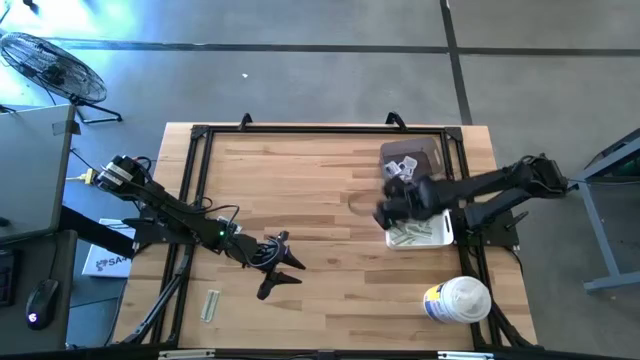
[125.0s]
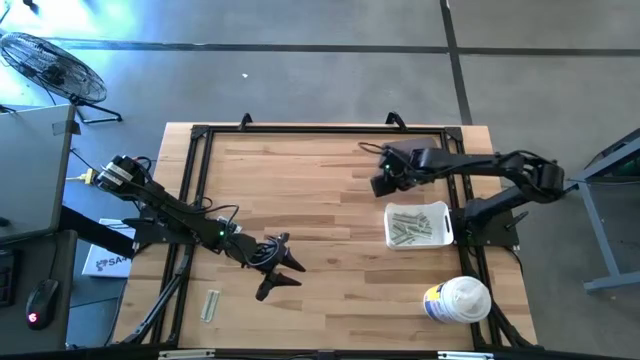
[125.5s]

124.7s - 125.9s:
Task: Pick & Place First Aid Supplies
Adjust the gray bin

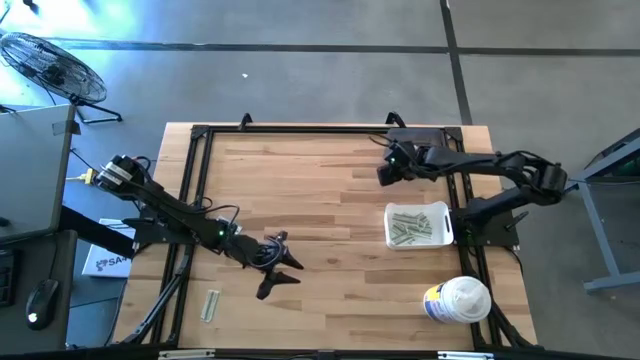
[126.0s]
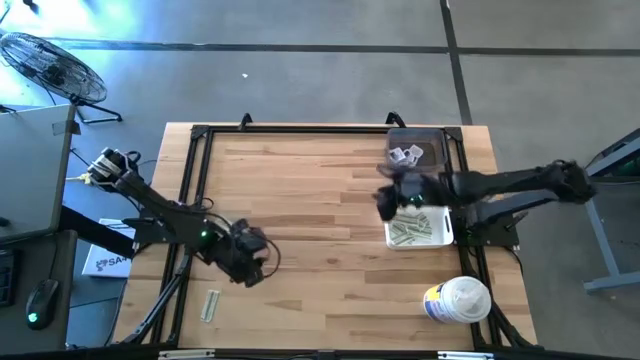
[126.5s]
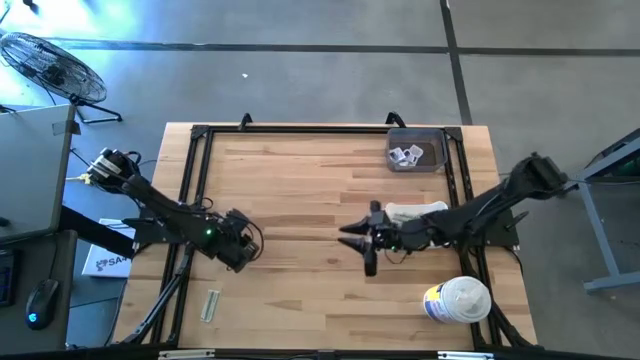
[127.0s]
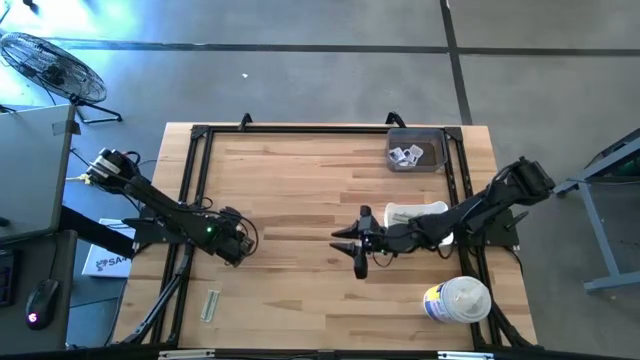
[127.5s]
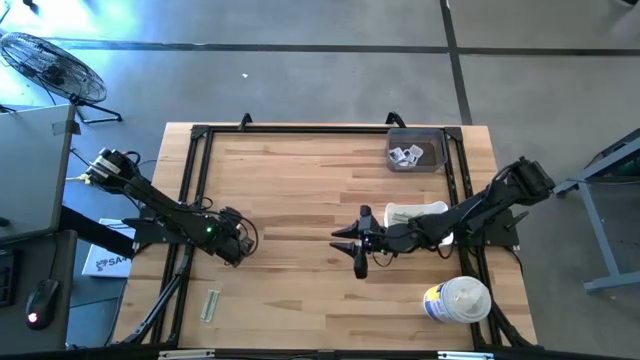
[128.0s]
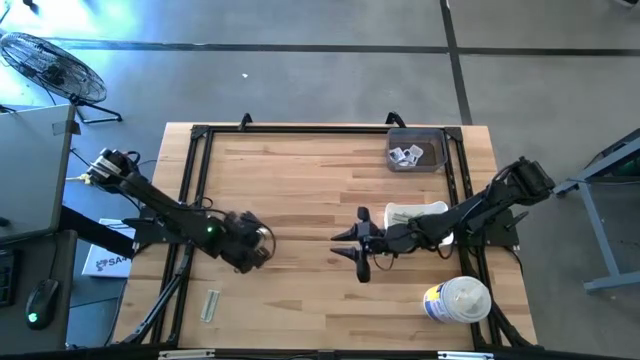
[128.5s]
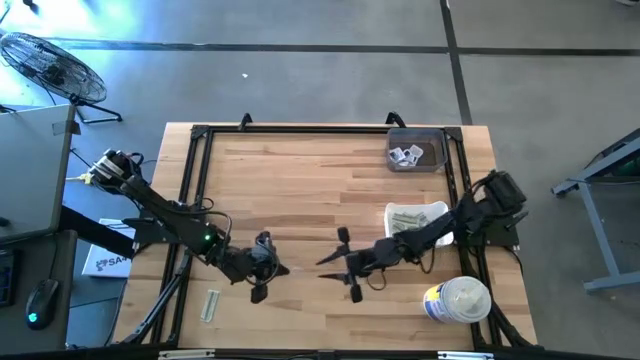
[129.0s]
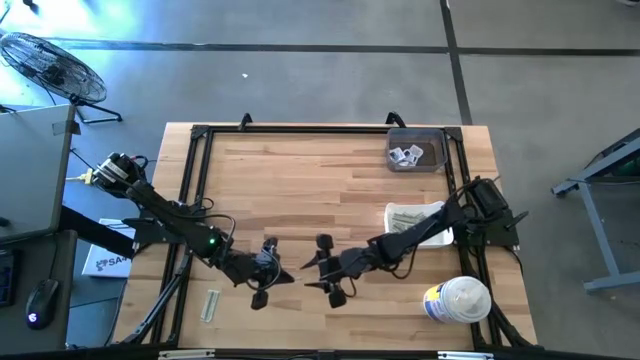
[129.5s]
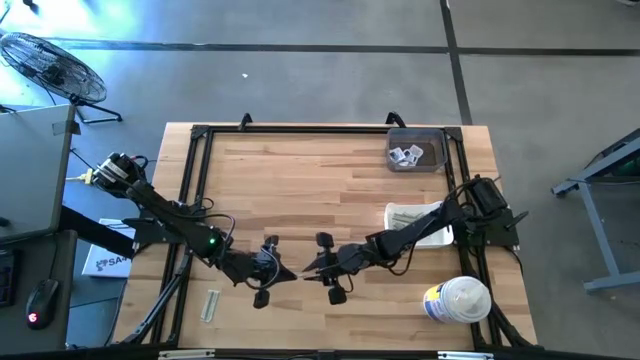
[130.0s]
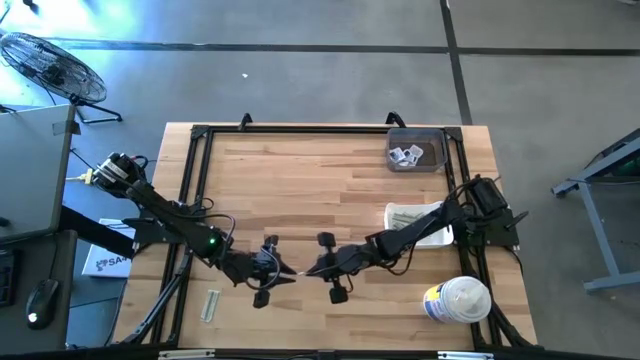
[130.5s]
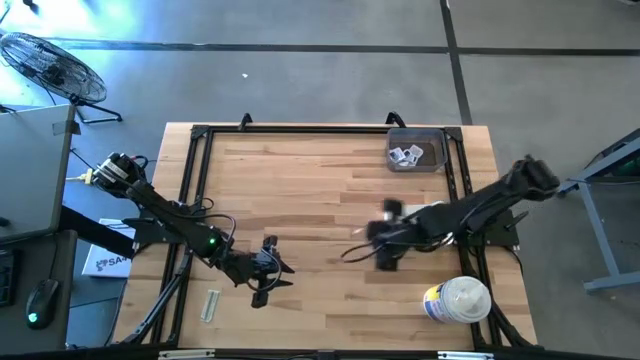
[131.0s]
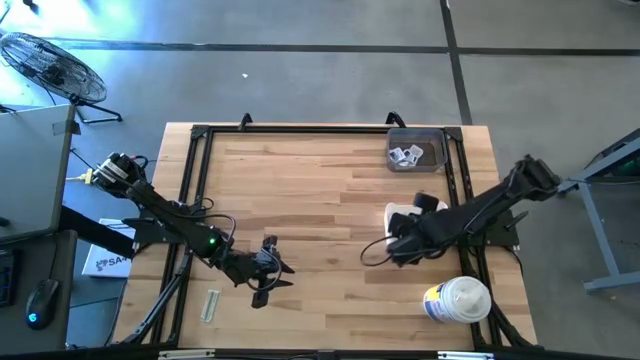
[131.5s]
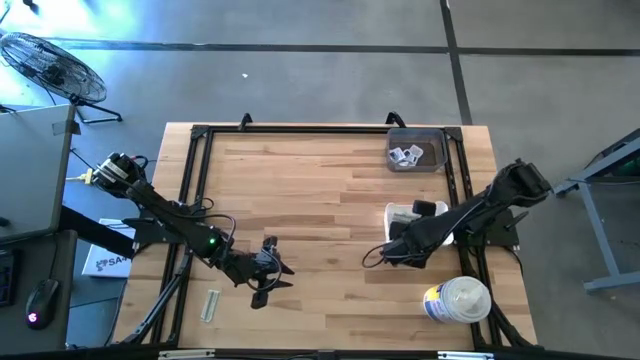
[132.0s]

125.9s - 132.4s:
Put the bandage into the white bin

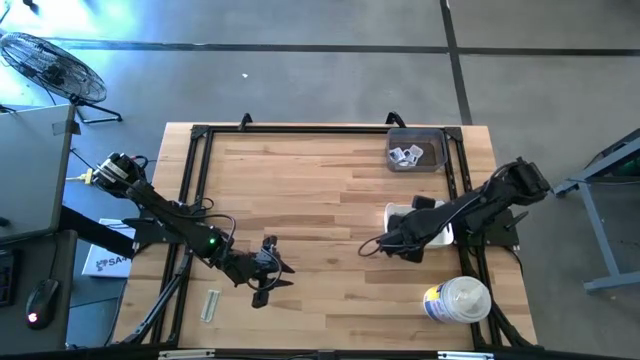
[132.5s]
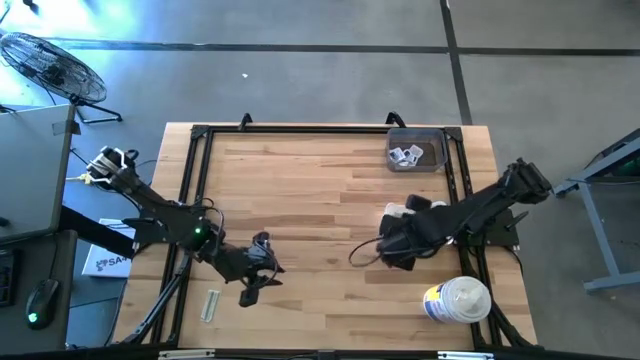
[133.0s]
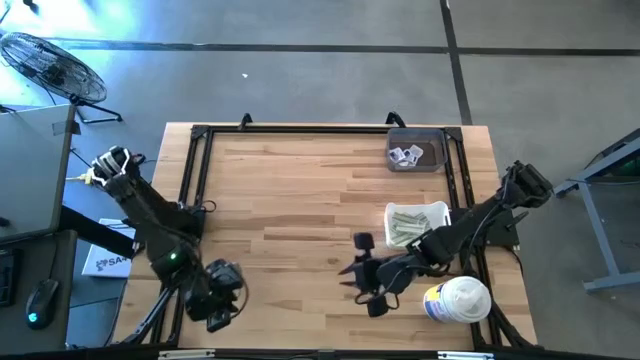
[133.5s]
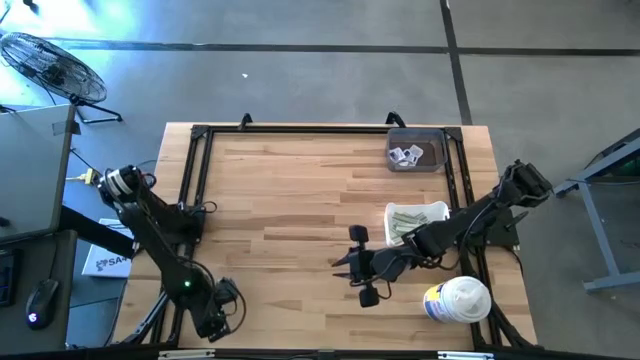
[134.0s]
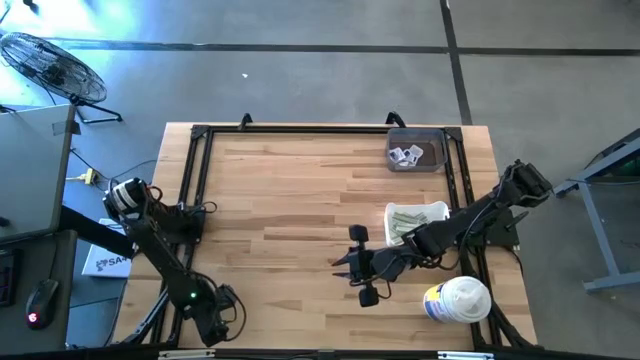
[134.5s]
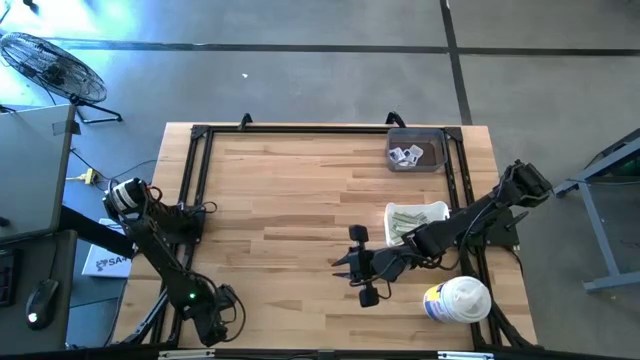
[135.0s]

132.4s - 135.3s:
Put the bandage into the white bin

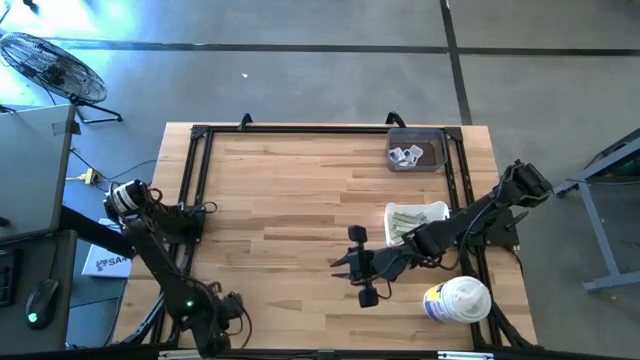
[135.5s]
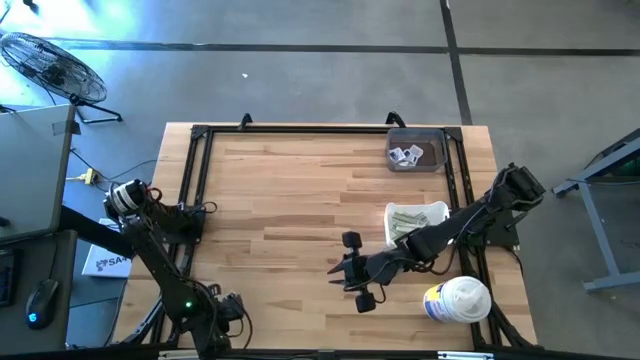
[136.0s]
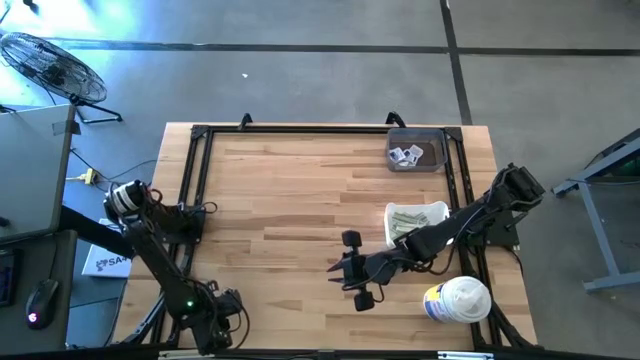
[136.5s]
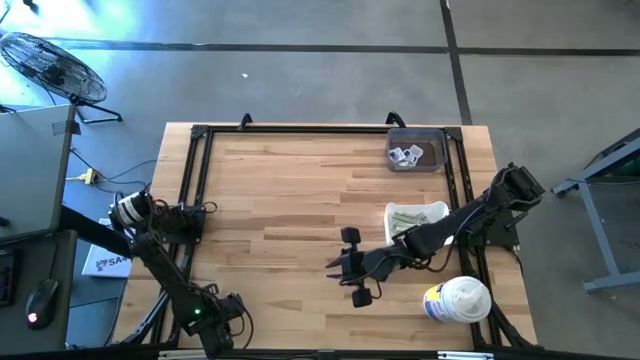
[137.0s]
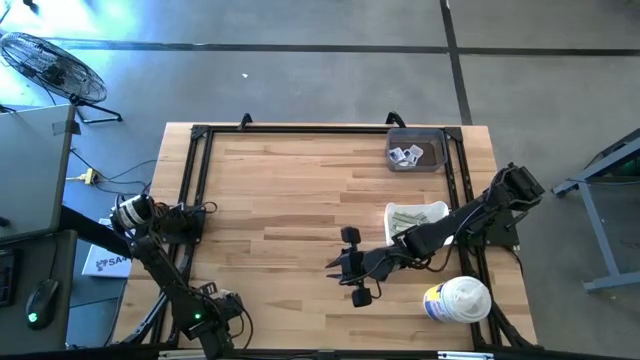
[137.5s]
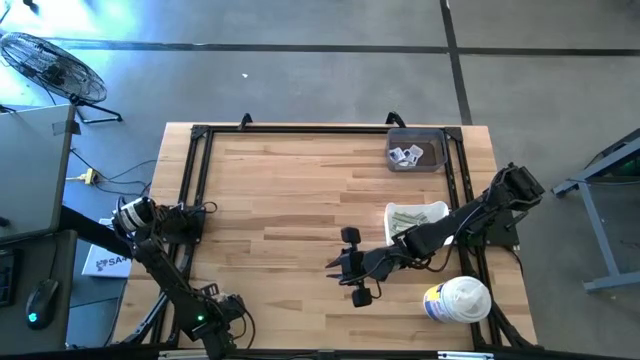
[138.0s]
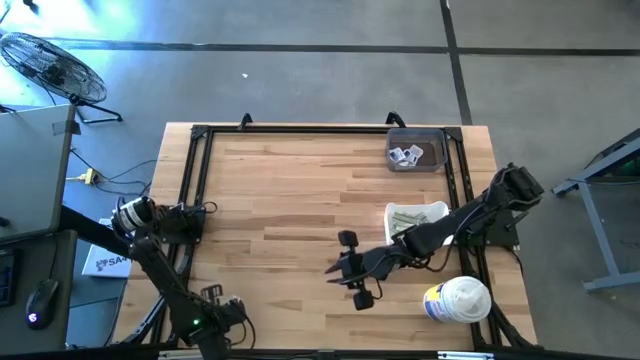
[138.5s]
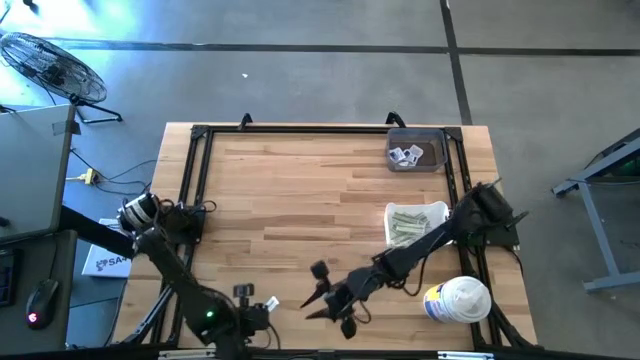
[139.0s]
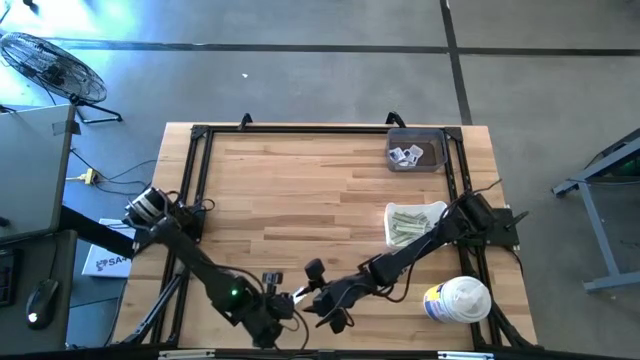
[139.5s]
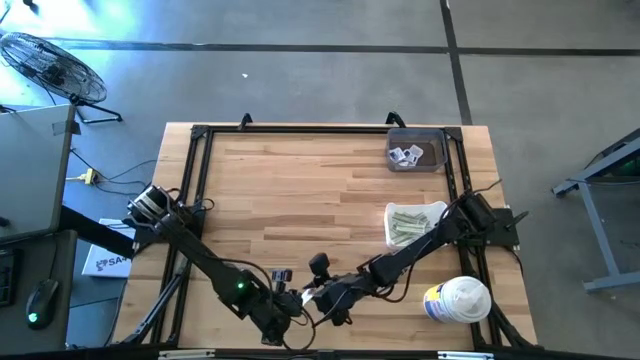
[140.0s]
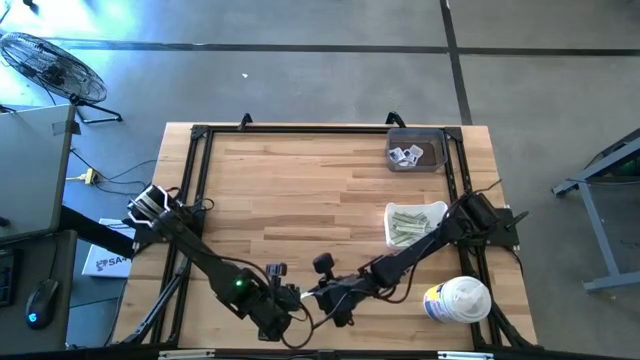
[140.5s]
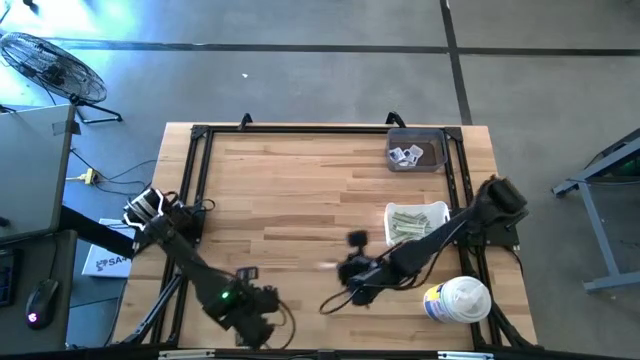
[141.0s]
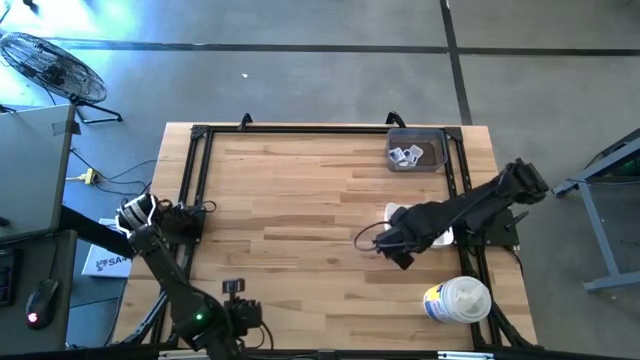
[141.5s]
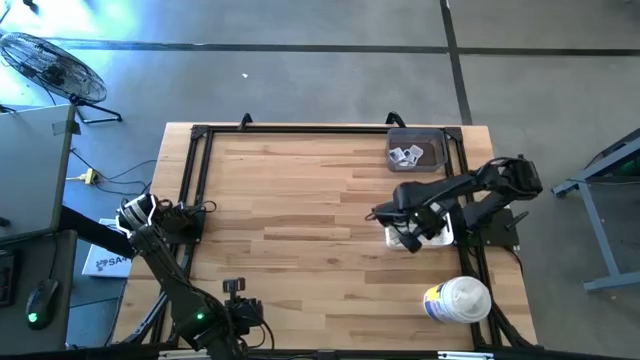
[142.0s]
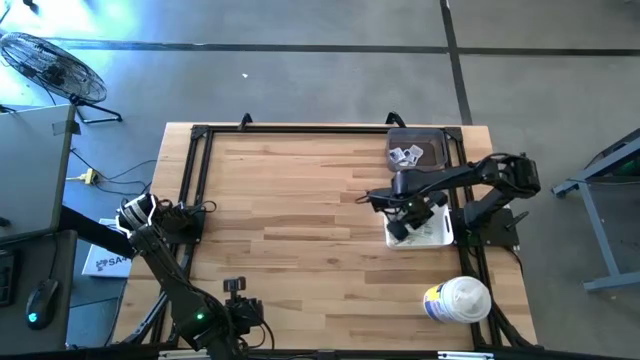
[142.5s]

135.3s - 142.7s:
Put the bandage into the white bin

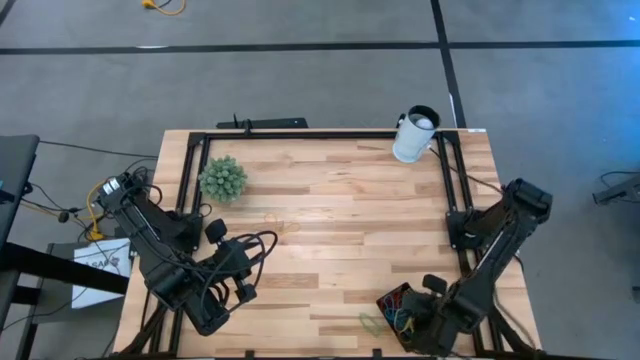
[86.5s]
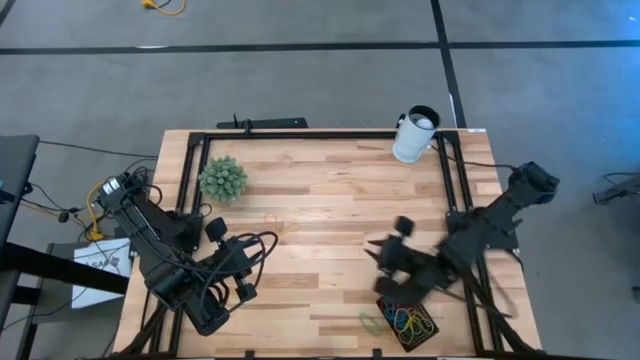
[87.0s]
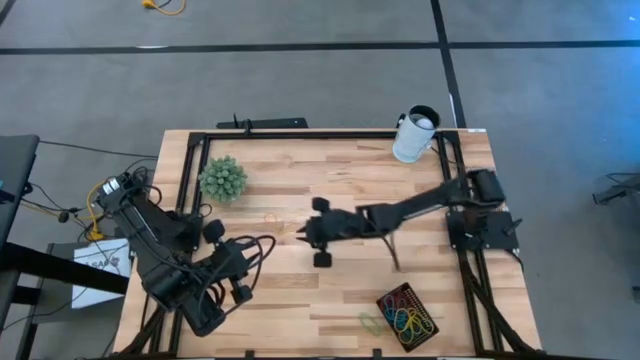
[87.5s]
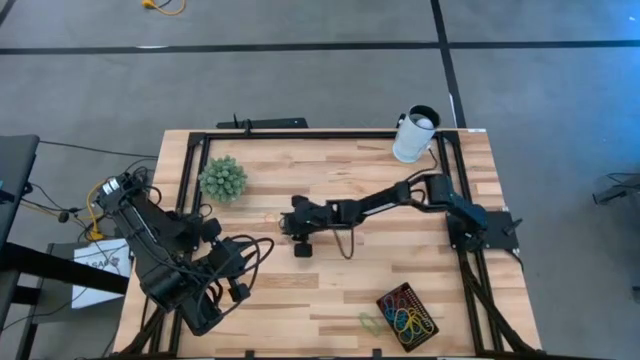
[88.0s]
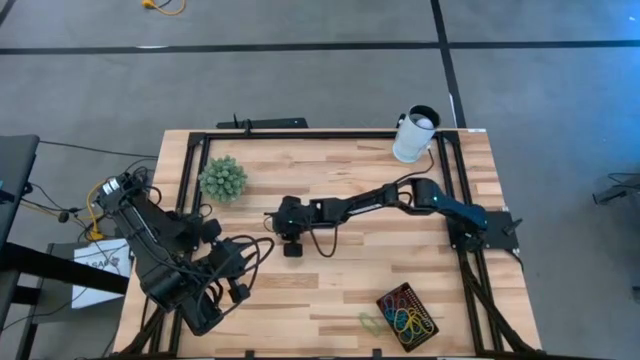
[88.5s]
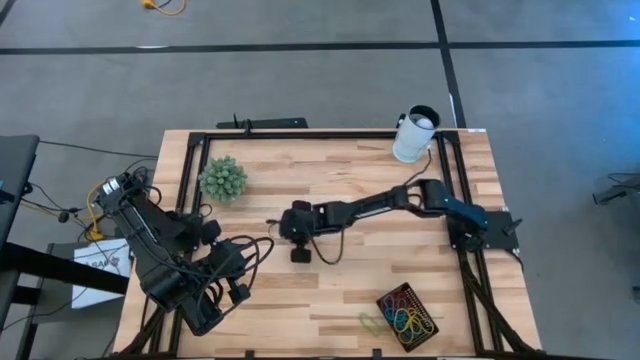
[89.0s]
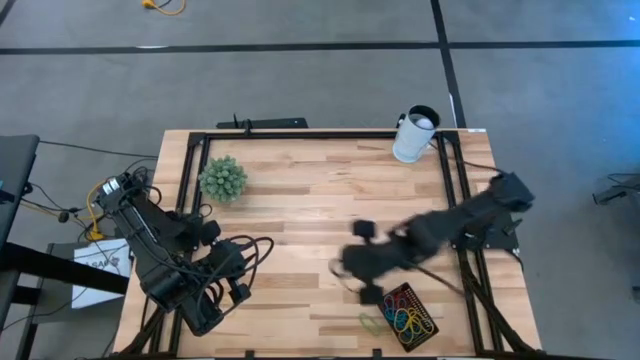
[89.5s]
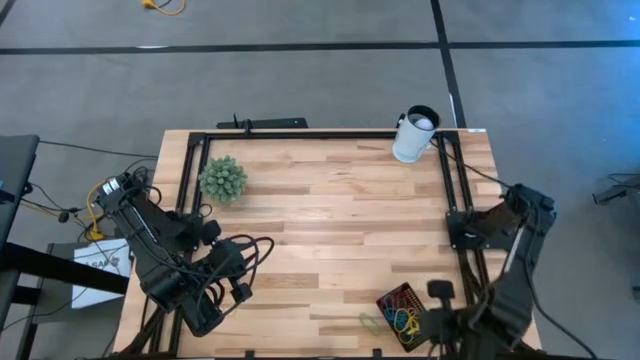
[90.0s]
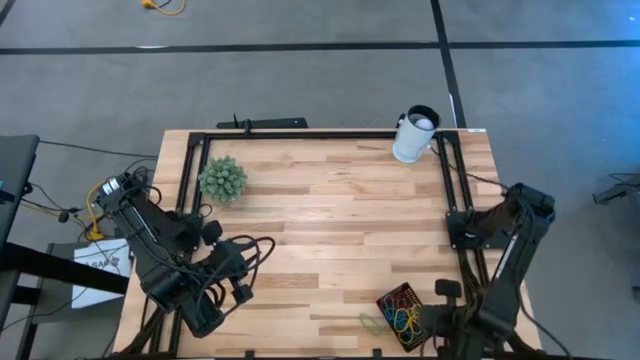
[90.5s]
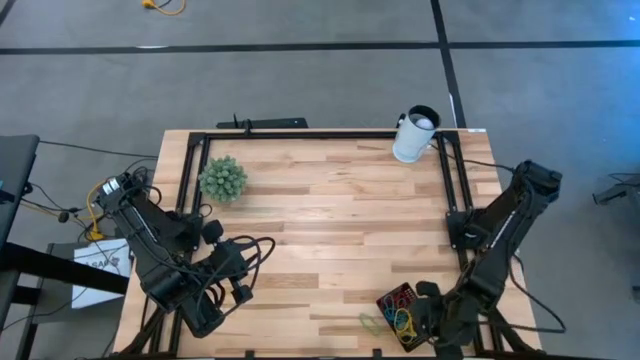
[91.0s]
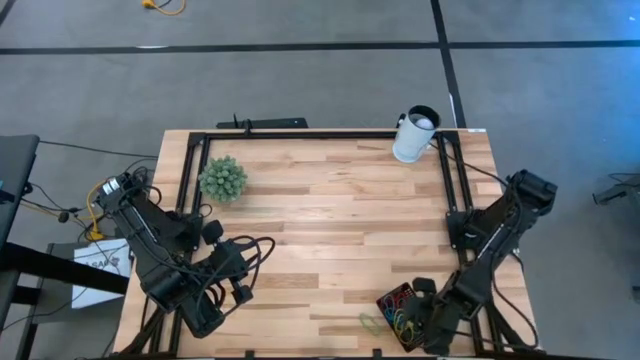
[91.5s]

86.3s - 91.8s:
Task: Pick and place rubber bands into bin
Put the yellow rubber band into the black basket
